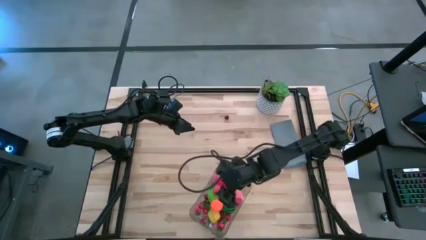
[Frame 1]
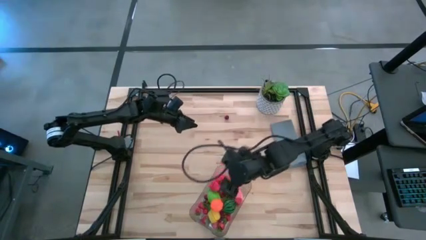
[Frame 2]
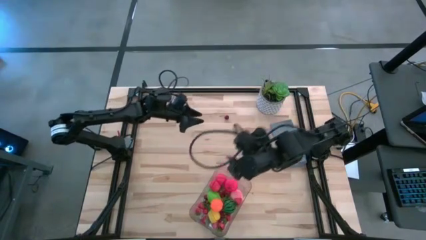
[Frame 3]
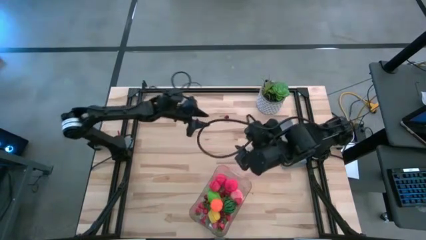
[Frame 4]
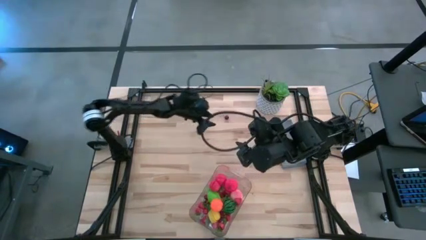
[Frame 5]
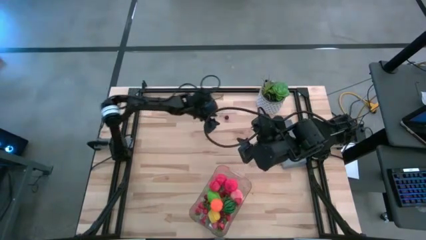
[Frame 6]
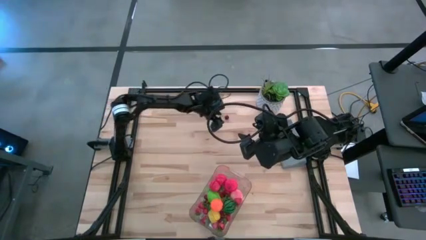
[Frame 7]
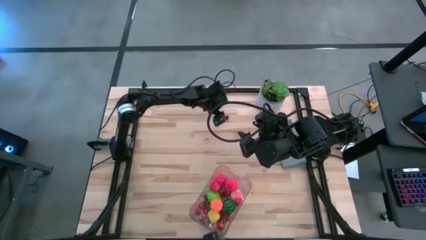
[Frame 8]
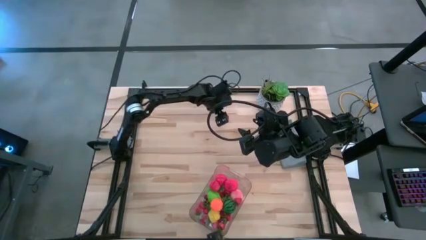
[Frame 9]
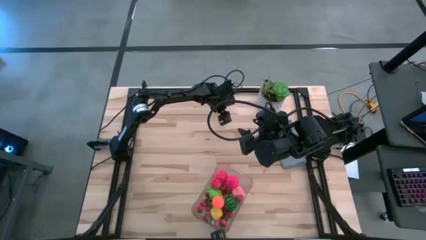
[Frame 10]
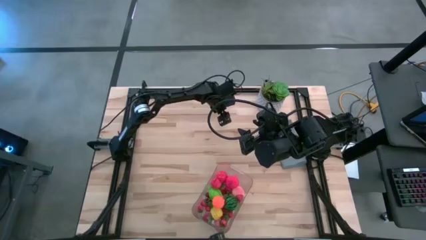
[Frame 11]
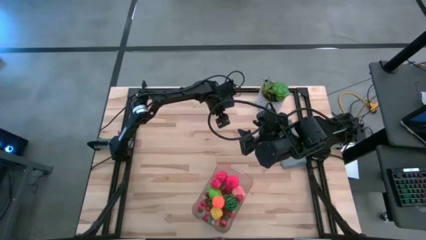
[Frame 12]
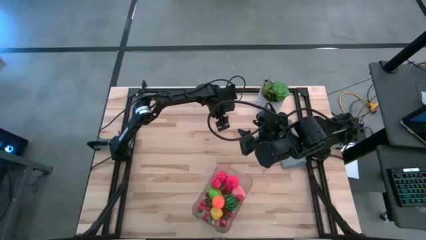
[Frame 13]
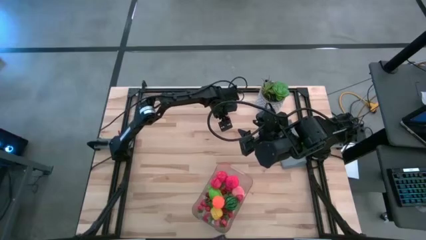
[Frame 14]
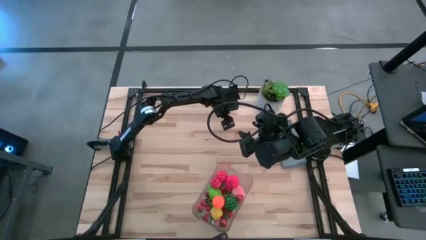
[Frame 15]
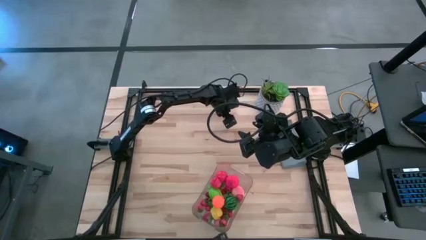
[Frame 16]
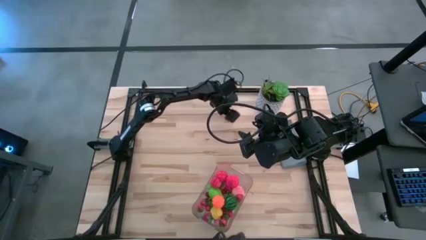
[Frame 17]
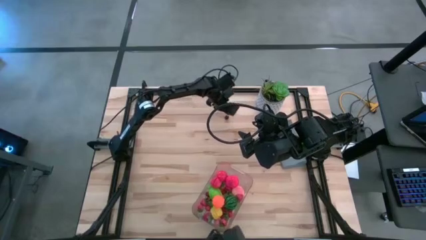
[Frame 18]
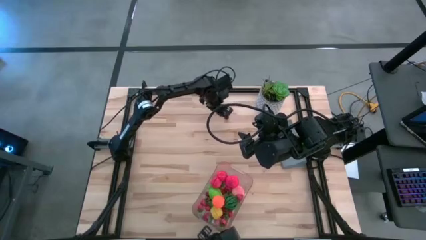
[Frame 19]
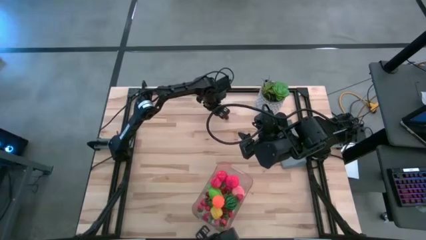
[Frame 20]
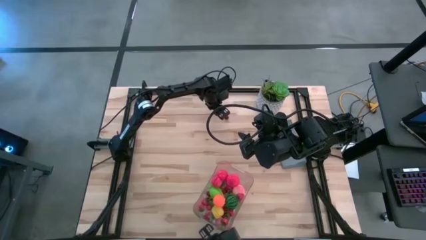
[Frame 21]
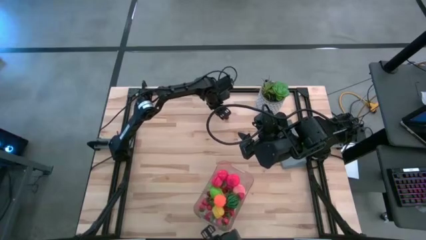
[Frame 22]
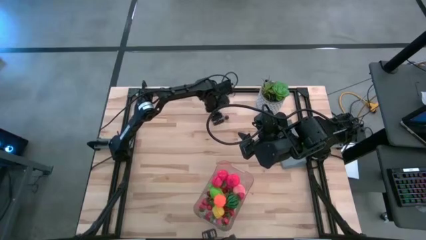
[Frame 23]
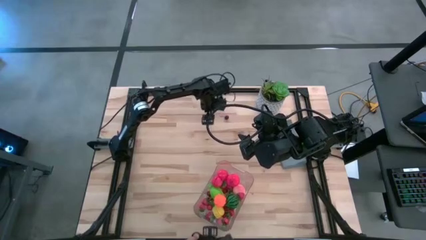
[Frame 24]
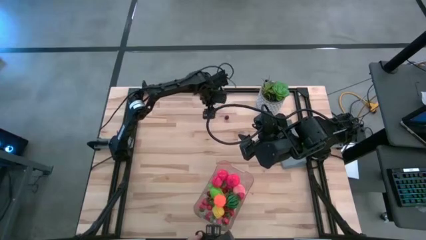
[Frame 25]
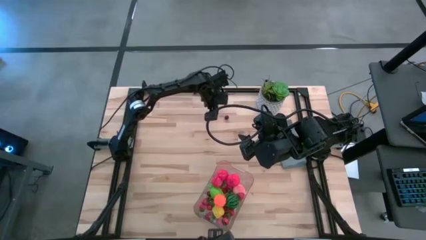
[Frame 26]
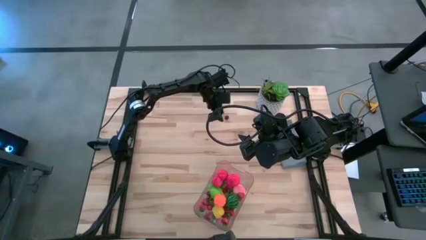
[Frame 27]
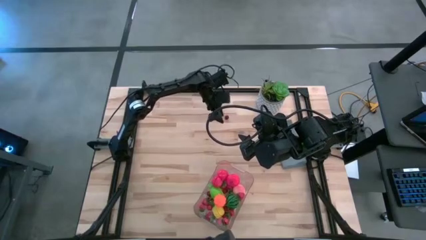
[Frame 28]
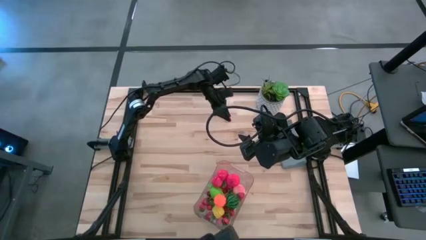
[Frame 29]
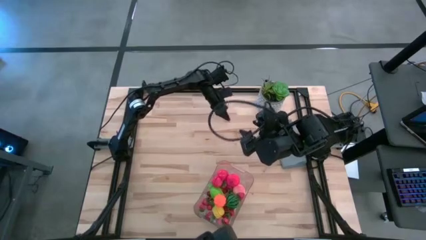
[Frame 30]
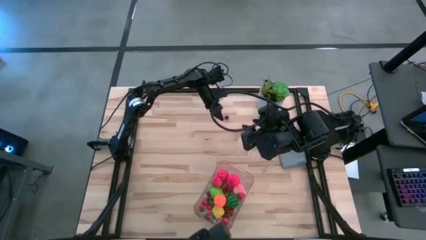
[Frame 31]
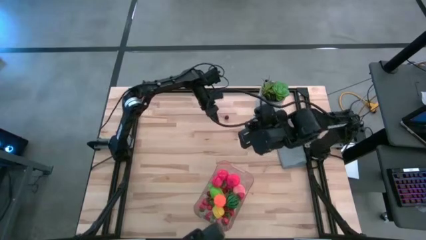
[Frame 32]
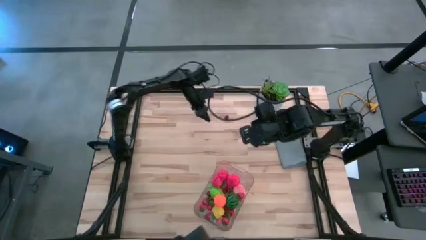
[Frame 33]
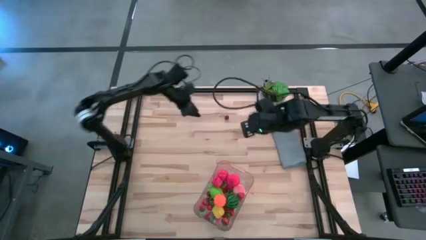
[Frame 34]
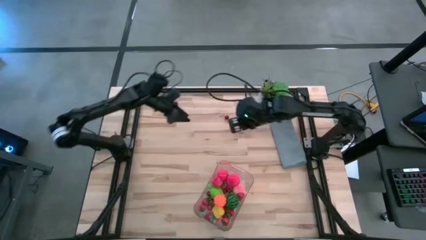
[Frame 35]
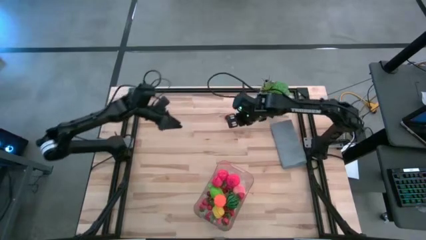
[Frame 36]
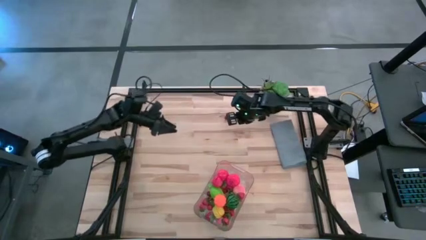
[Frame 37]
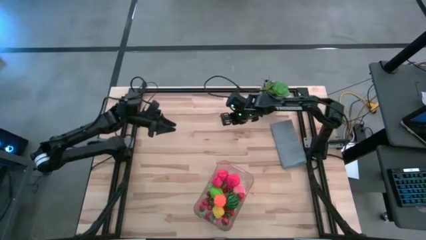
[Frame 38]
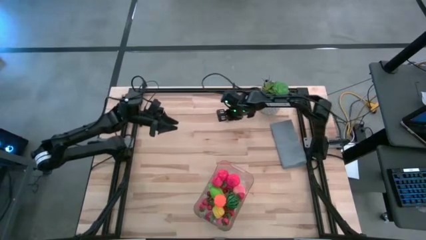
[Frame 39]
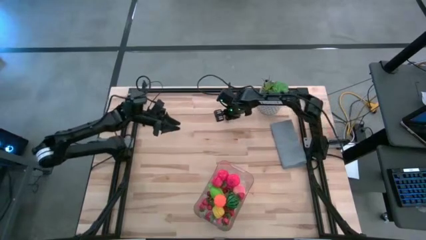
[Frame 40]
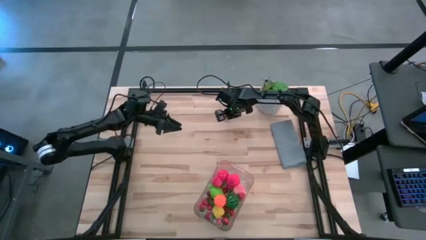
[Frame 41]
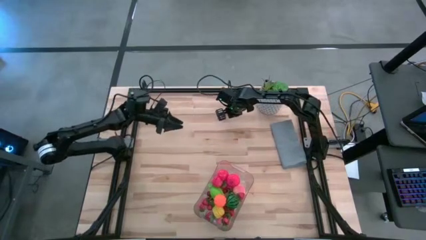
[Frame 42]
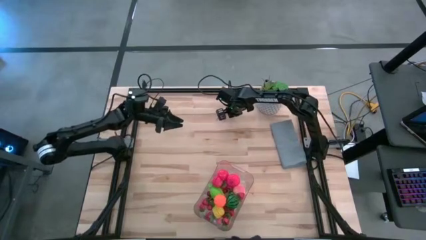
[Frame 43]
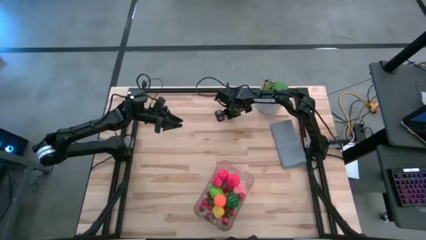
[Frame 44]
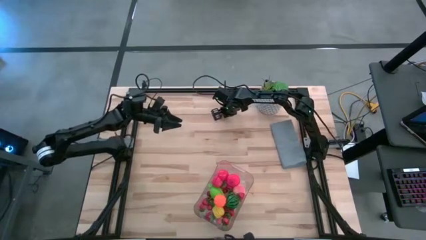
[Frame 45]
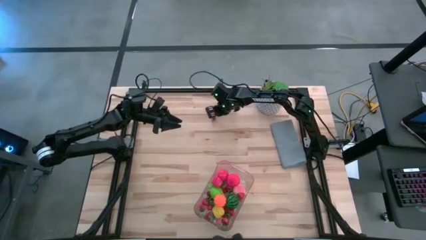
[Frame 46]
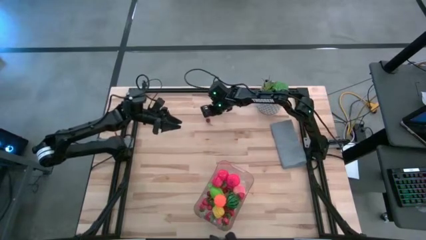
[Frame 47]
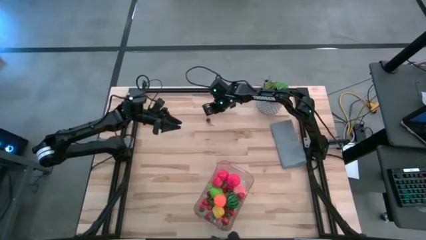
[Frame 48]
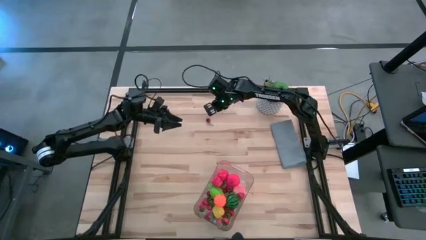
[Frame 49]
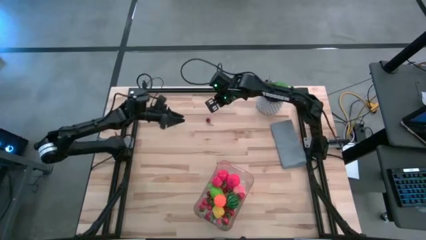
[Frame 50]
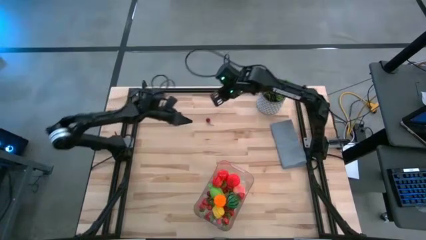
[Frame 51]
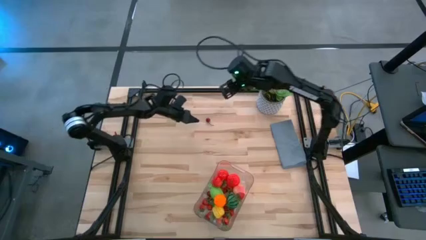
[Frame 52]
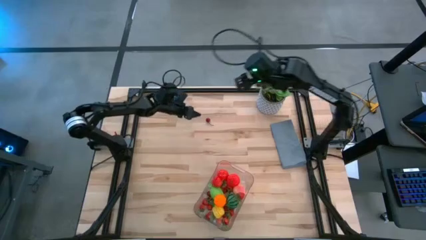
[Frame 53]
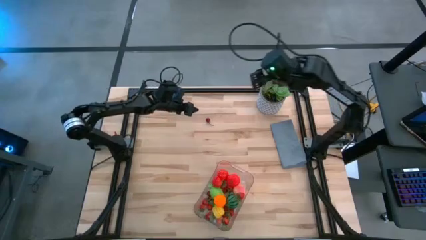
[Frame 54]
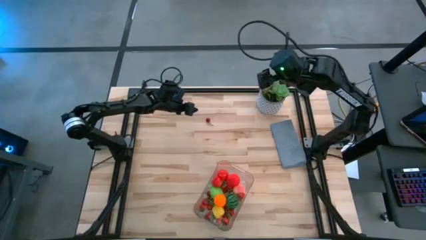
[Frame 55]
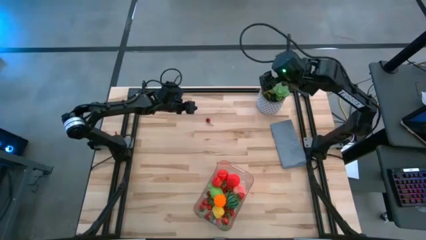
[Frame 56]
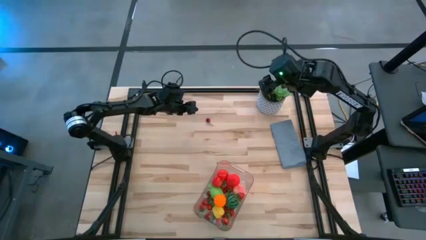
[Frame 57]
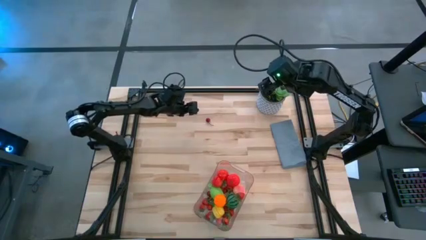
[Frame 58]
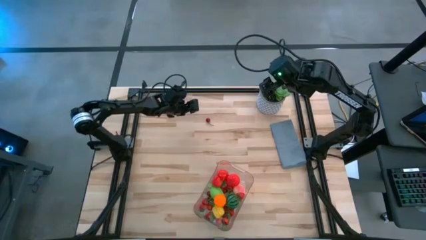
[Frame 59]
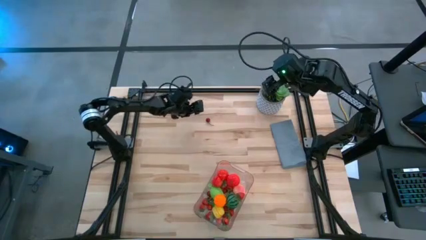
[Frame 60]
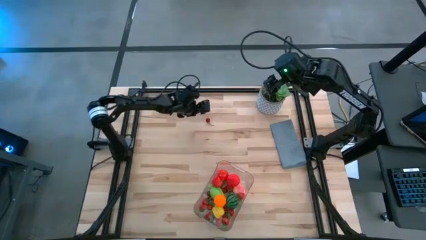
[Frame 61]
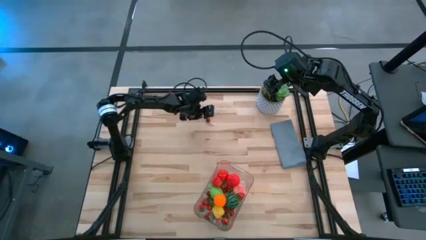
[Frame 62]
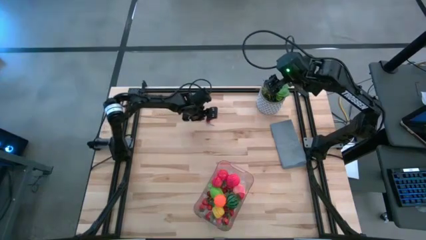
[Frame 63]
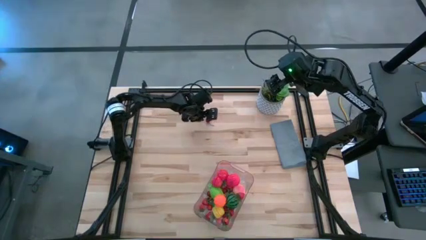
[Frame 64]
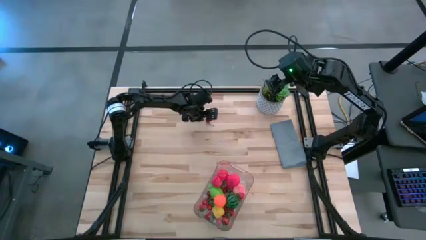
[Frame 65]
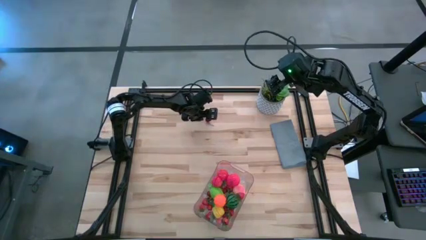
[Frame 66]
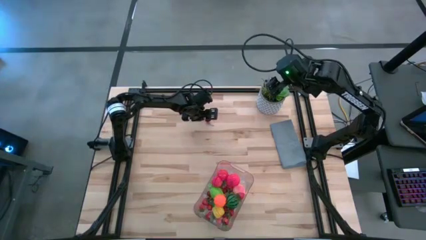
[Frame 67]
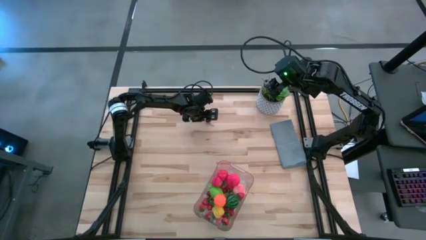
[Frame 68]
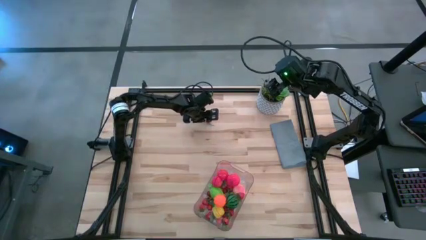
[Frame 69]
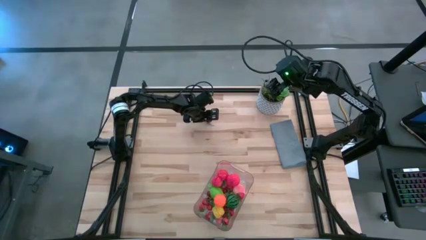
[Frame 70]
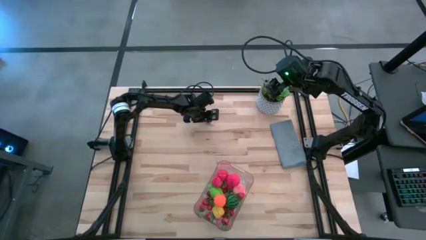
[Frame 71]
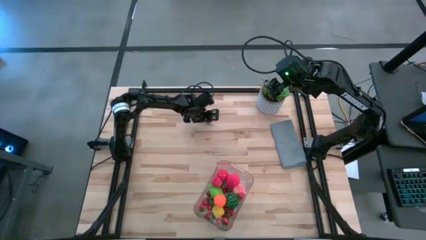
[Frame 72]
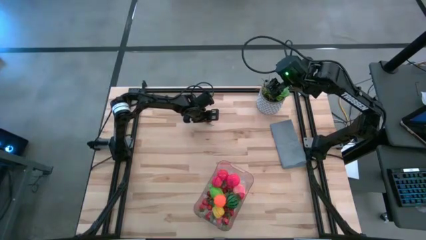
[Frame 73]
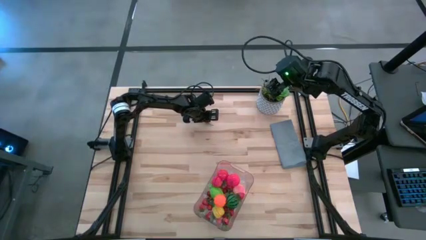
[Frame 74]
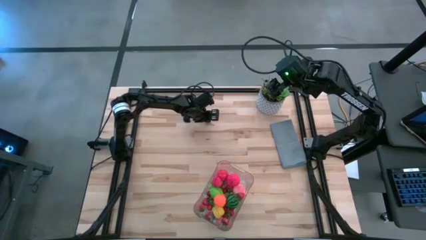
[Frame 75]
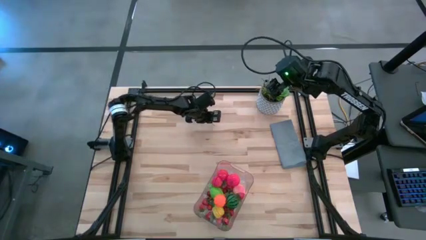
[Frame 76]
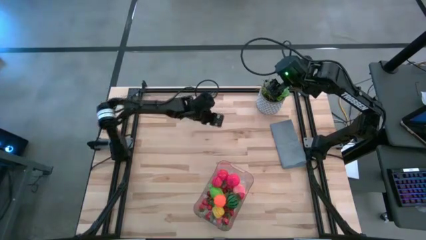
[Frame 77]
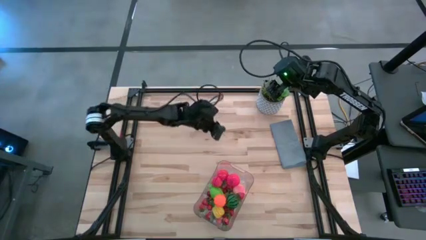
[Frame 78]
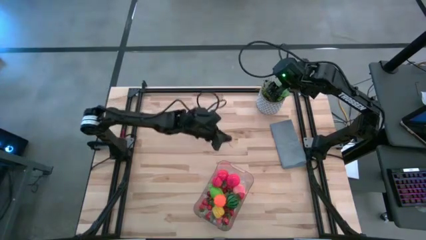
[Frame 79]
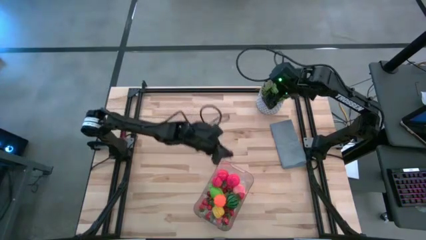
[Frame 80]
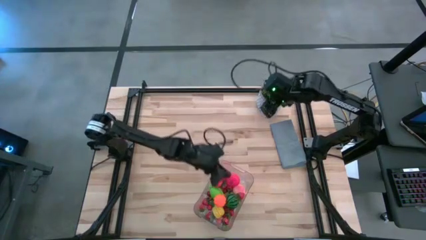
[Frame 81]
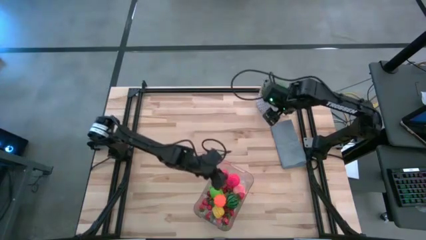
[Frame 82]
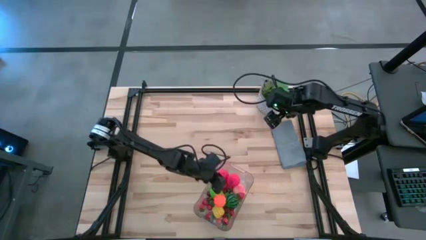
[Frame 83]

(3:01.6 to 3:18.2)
Task: Pick and placing Produce into tupperware
Put the red cherry into the transparent basket
